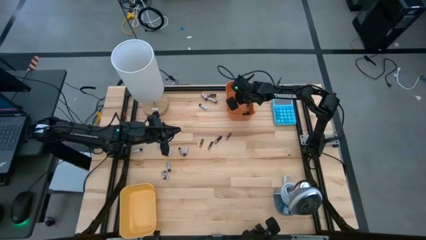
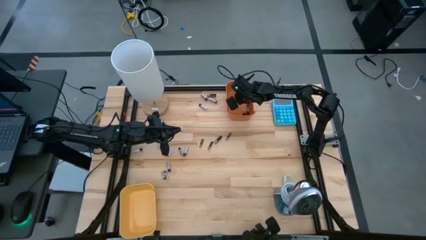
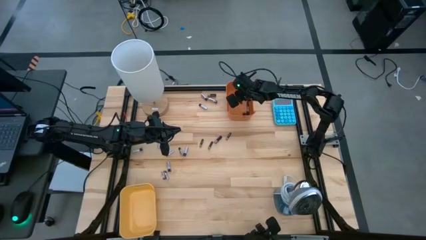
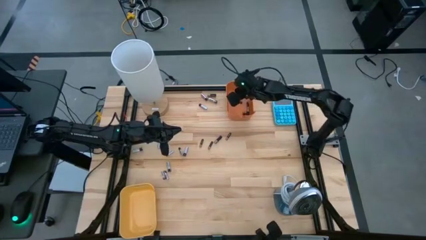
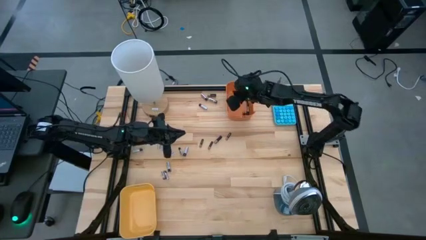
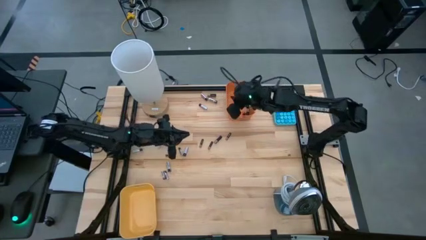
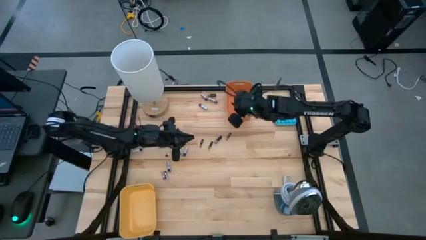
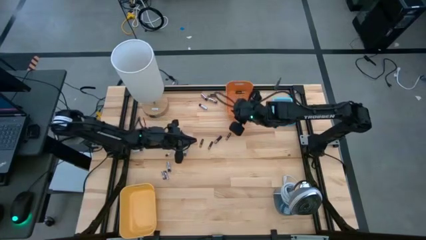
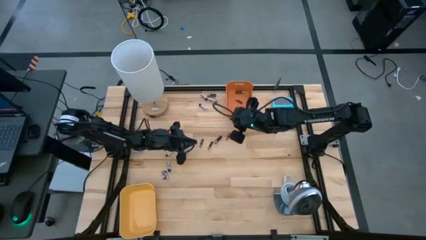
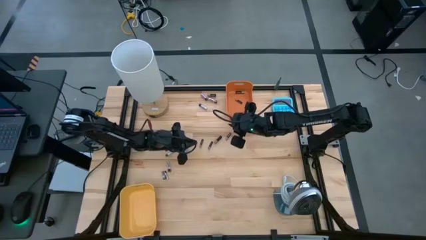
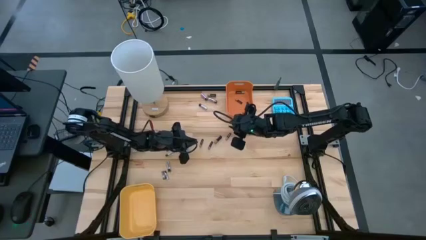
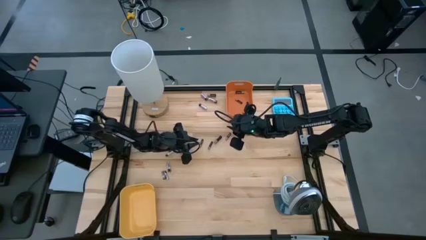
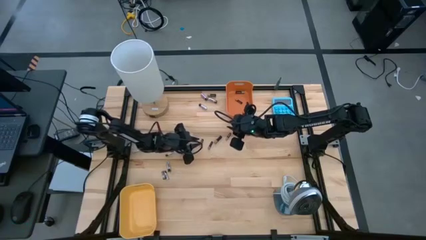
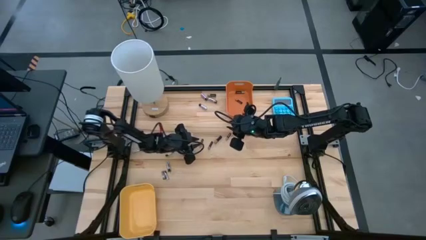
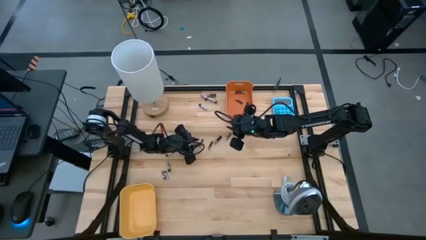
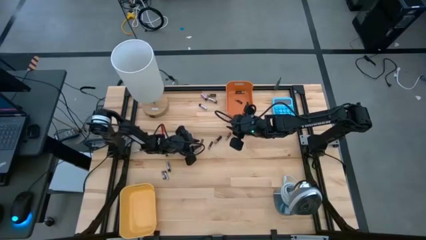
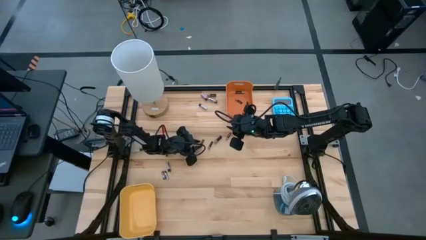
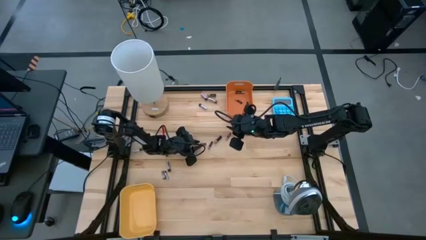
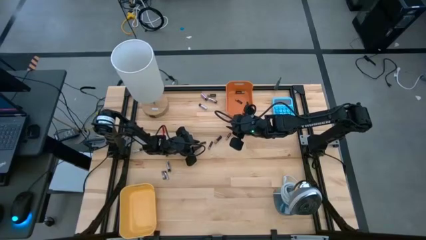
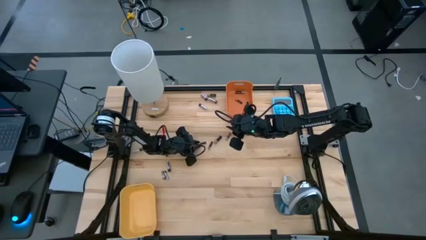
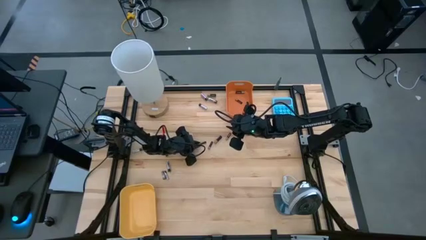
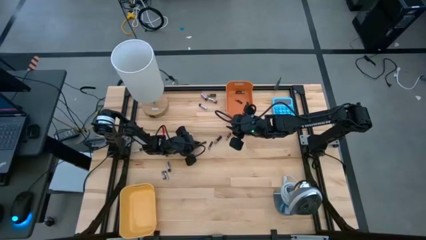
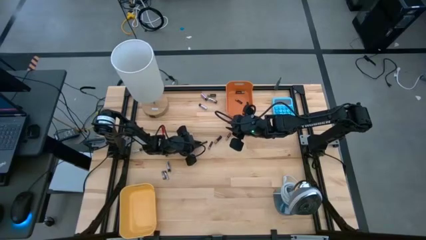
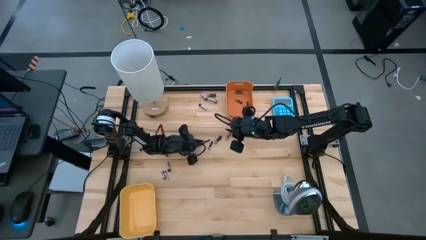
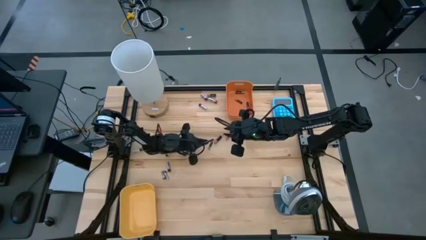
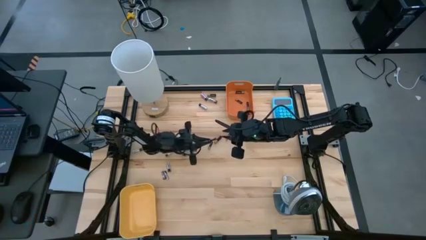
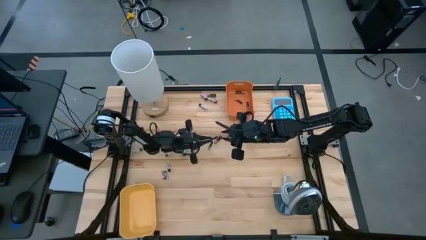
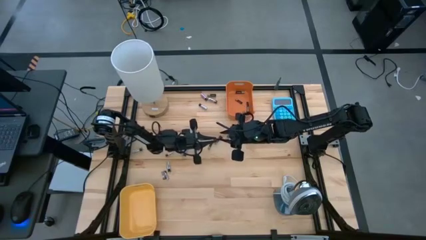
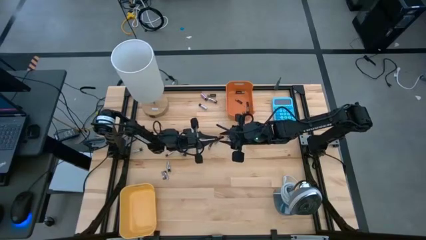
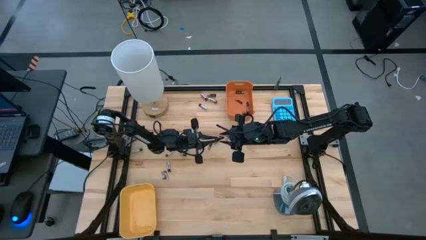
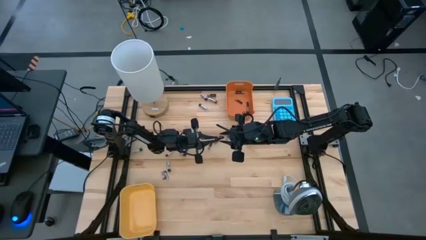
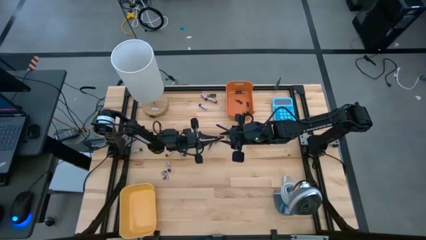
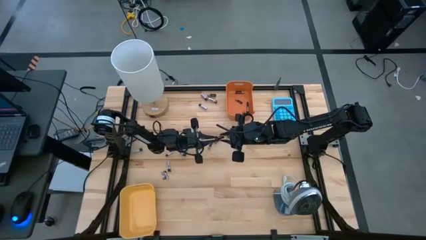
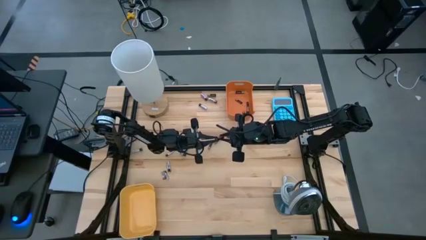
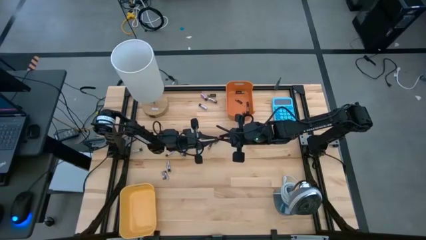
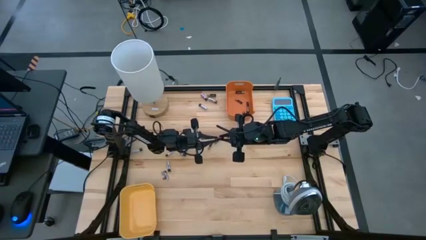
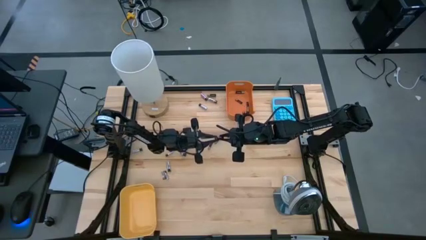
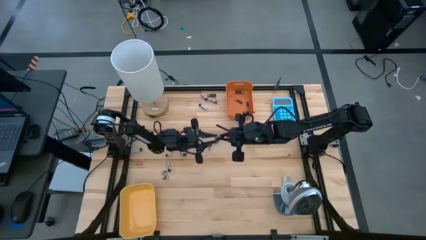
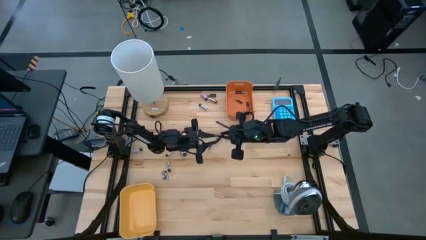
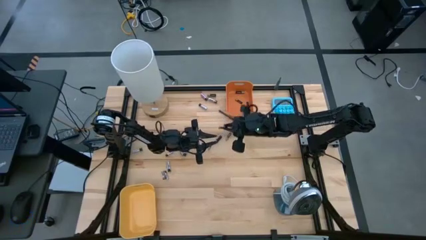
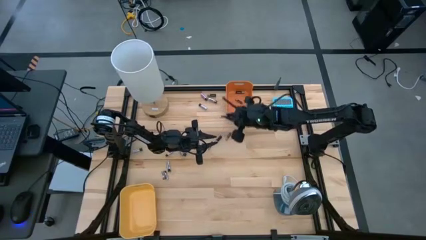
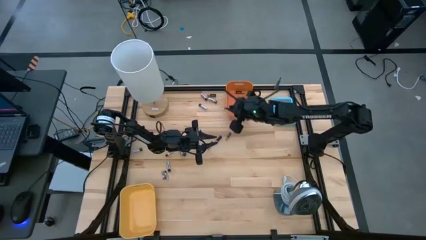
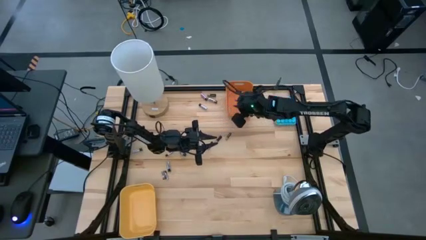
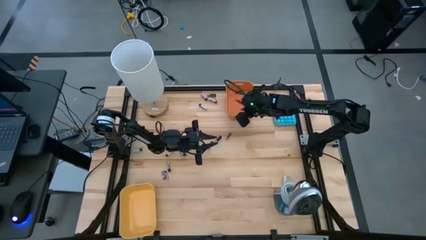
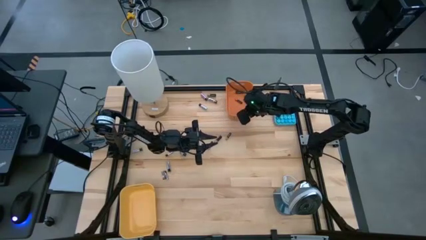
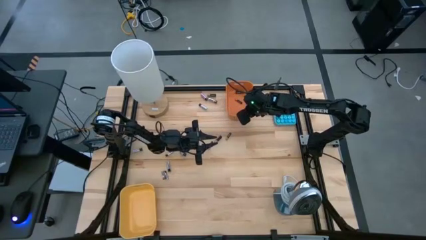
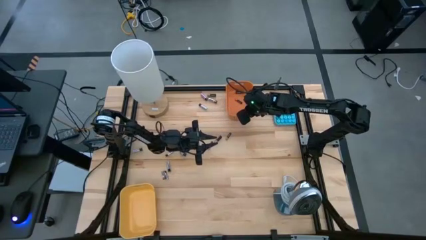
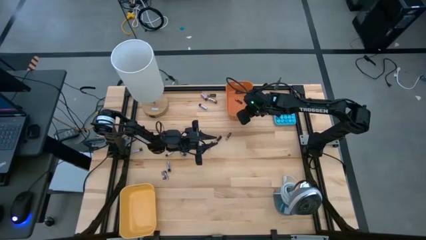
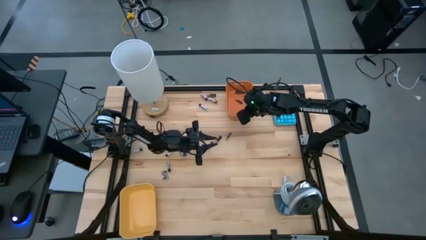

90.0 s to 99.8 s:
Task: Sort batteries
Put the black battery into the orange bin

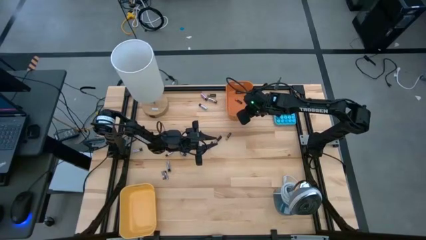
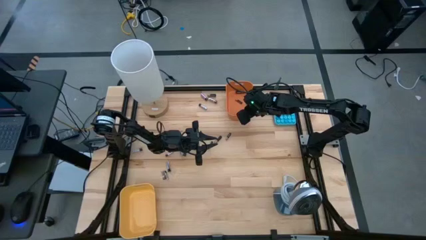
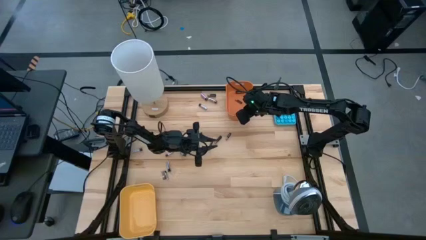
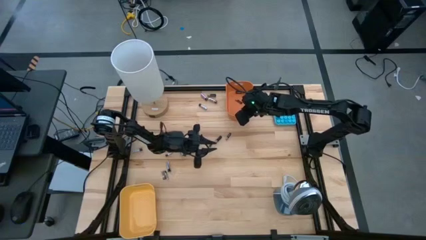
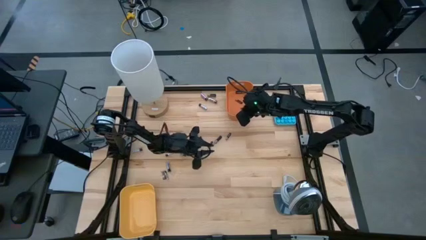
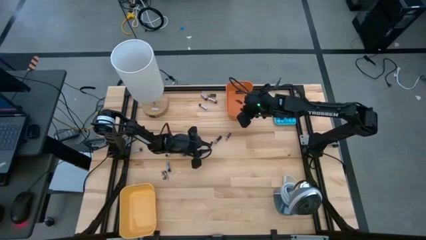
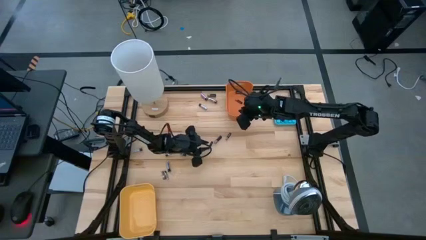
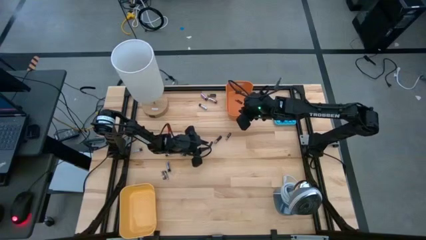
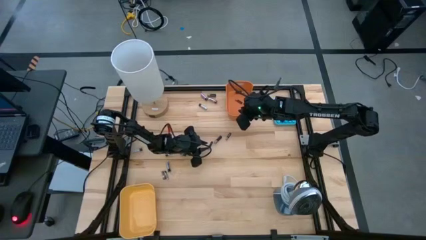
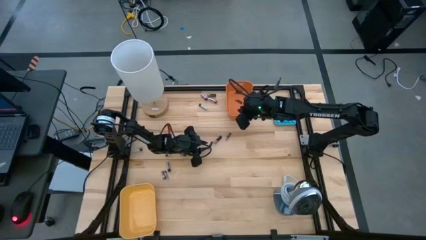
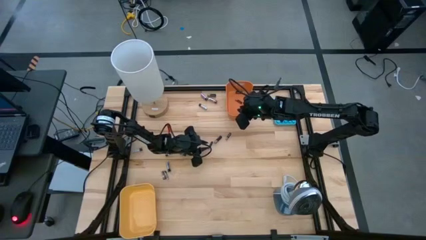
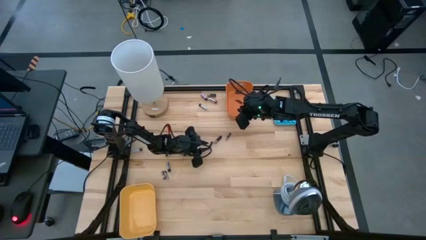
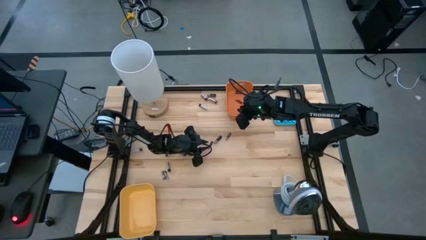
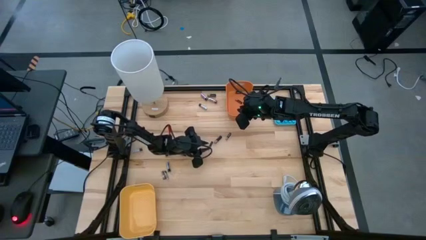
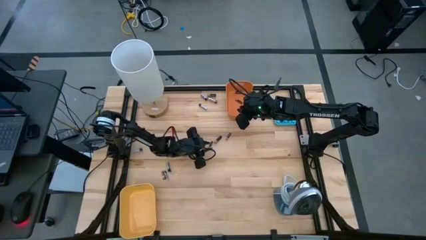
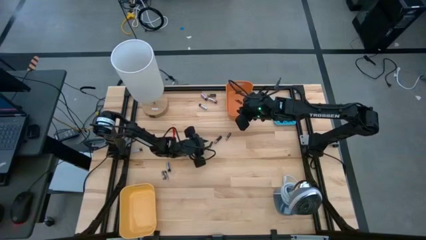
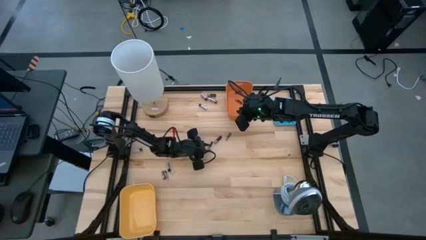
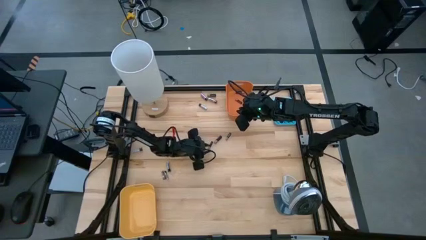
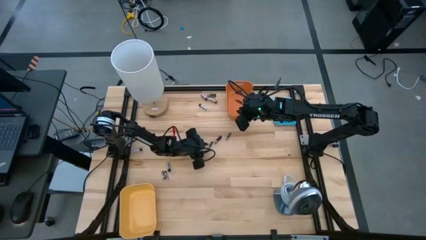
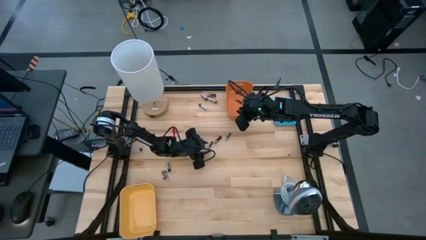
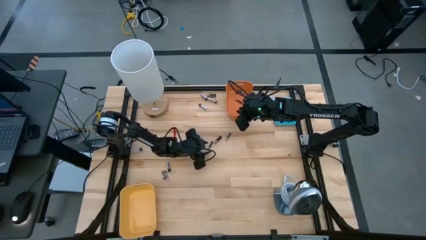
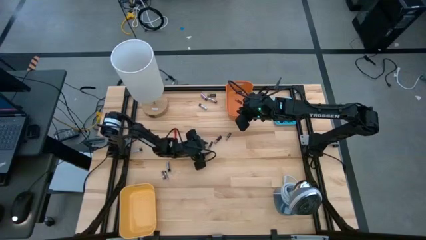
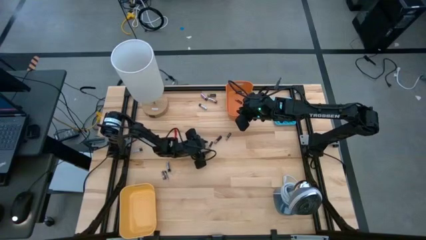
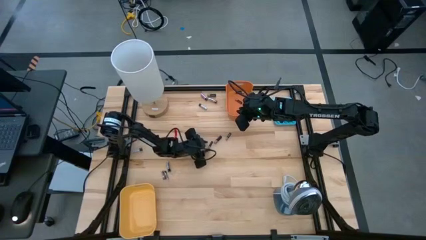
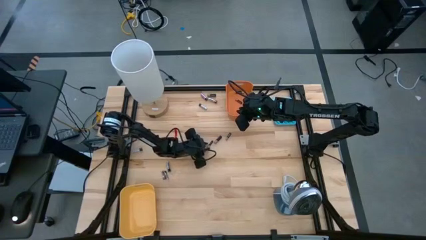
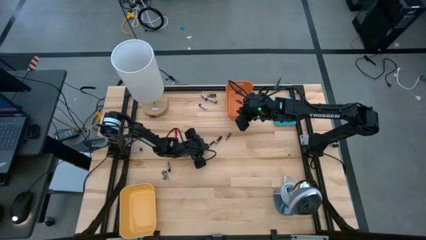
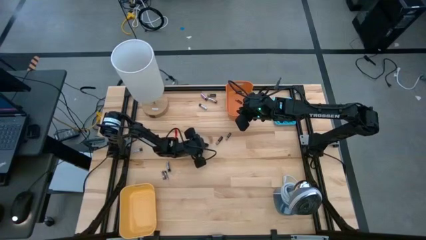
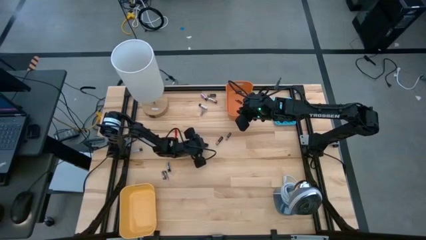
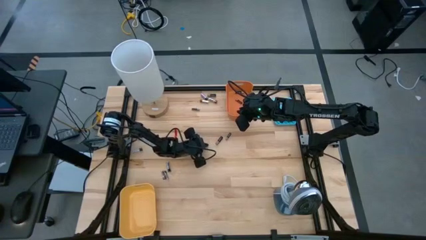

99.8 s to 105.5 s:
Put the black battery into the orange bin
